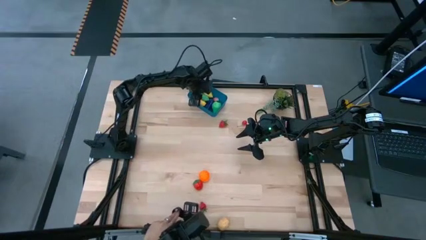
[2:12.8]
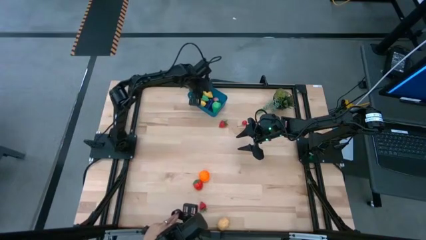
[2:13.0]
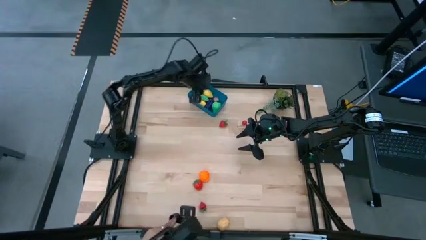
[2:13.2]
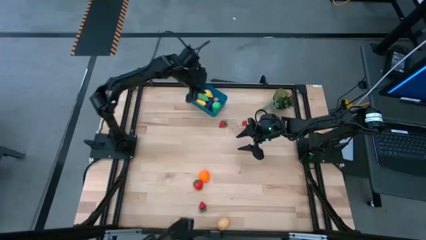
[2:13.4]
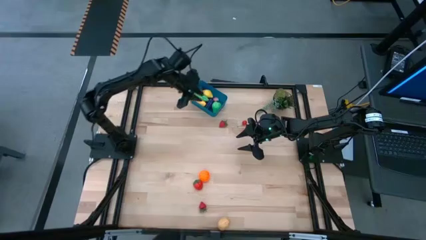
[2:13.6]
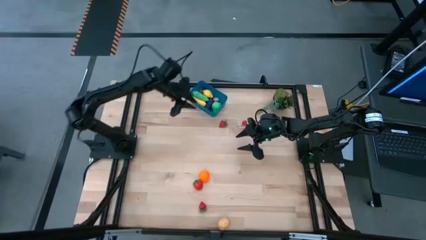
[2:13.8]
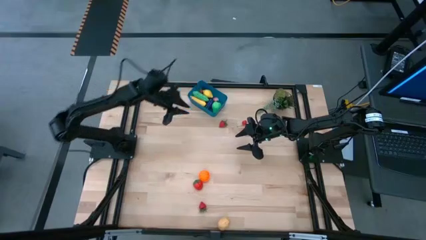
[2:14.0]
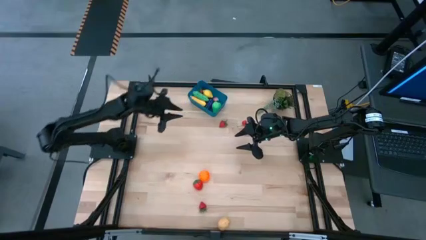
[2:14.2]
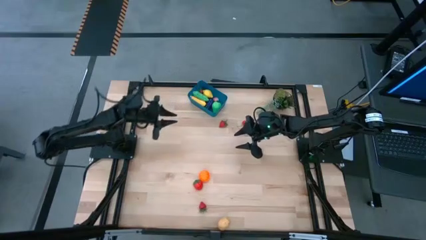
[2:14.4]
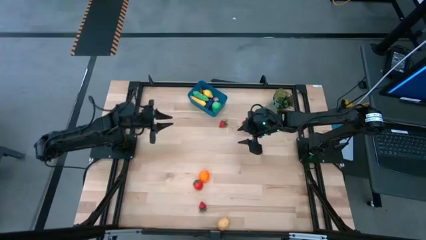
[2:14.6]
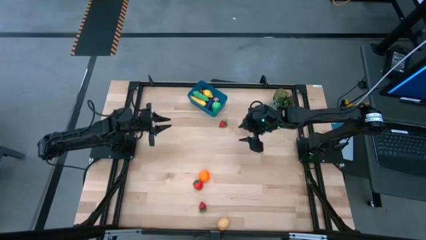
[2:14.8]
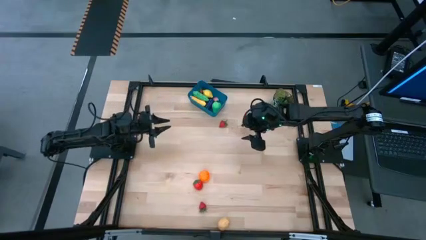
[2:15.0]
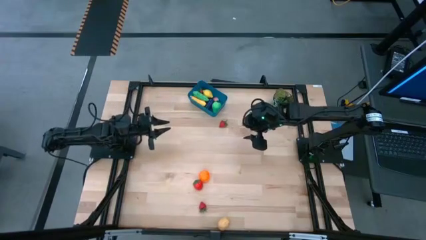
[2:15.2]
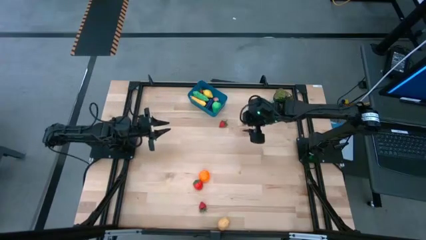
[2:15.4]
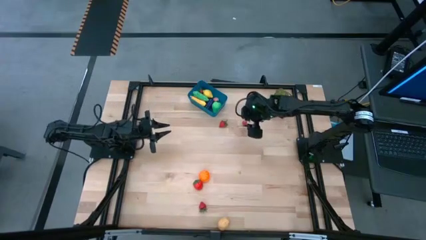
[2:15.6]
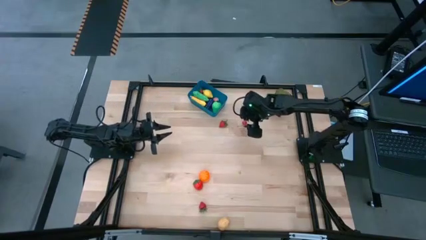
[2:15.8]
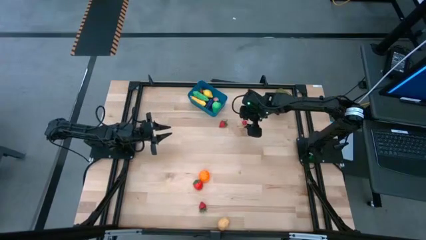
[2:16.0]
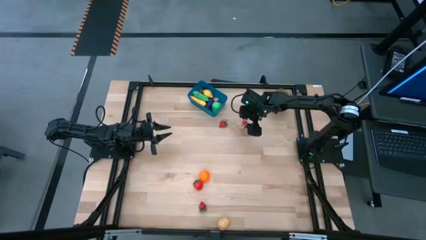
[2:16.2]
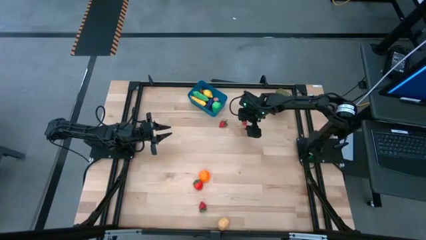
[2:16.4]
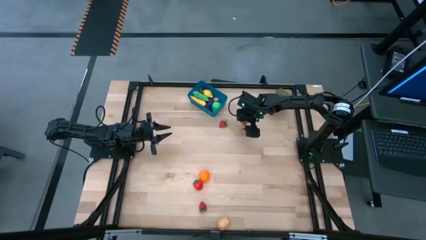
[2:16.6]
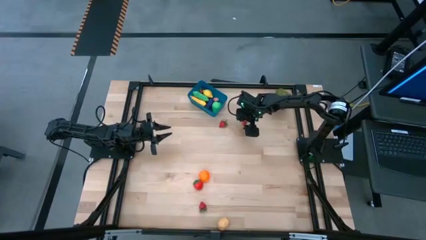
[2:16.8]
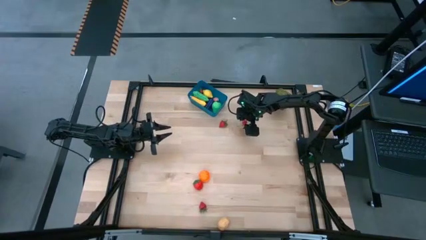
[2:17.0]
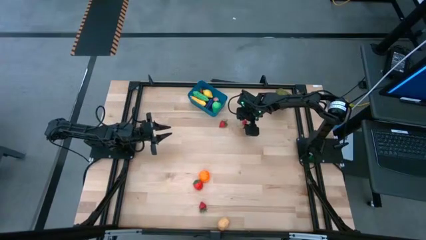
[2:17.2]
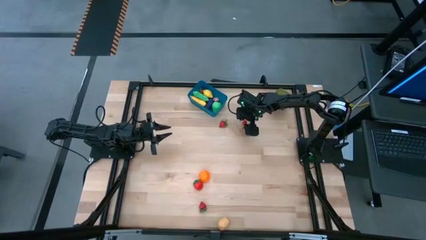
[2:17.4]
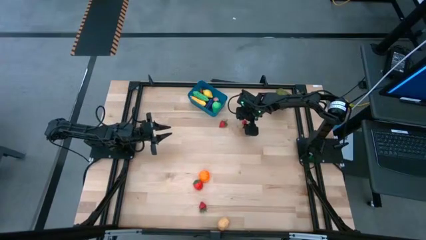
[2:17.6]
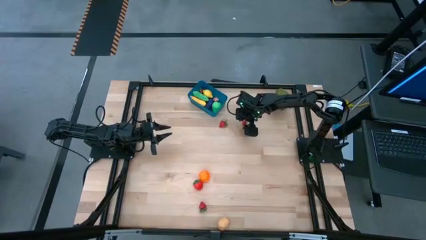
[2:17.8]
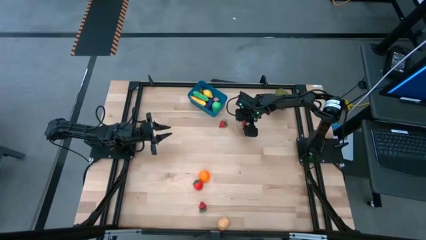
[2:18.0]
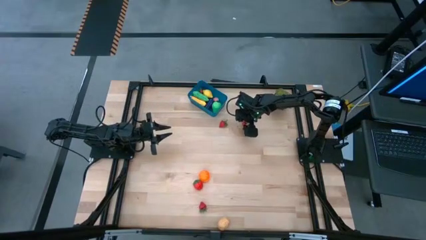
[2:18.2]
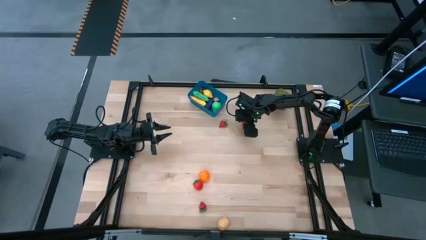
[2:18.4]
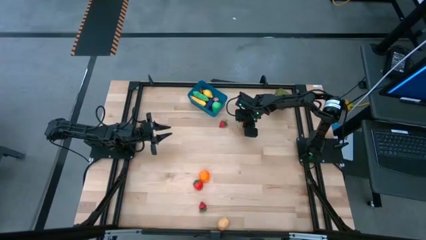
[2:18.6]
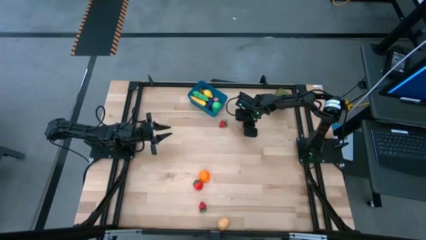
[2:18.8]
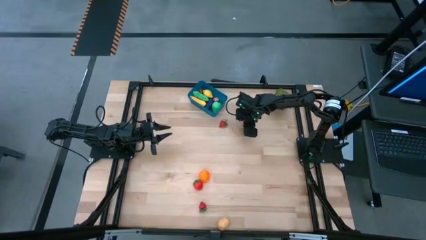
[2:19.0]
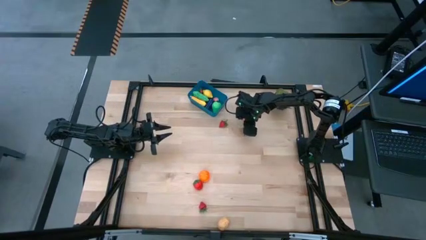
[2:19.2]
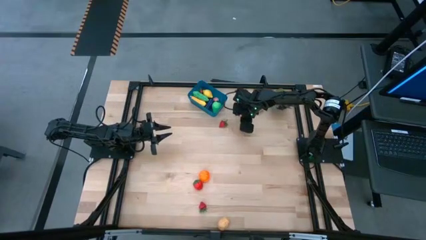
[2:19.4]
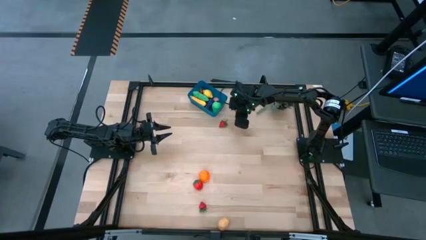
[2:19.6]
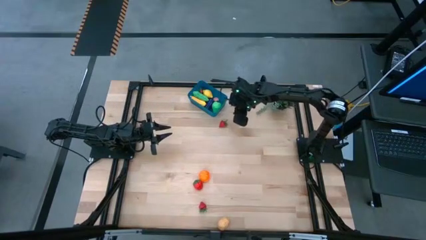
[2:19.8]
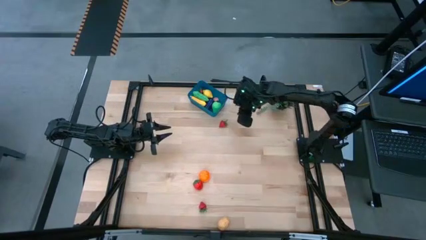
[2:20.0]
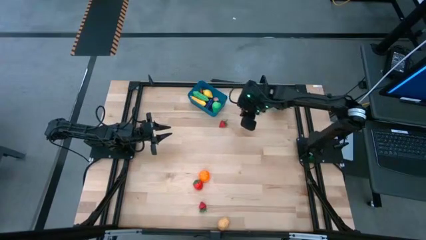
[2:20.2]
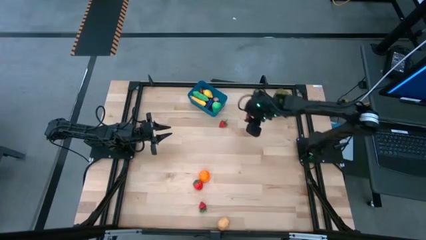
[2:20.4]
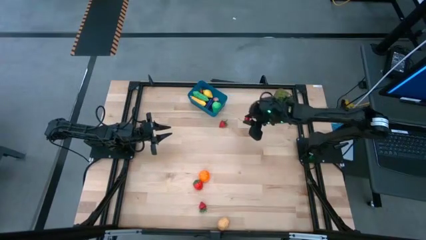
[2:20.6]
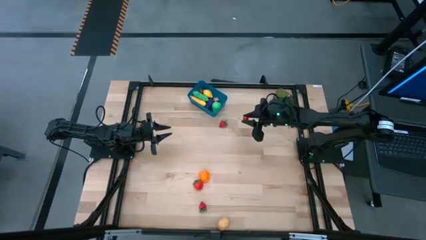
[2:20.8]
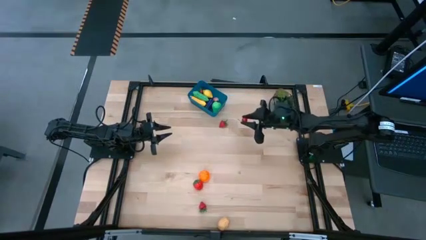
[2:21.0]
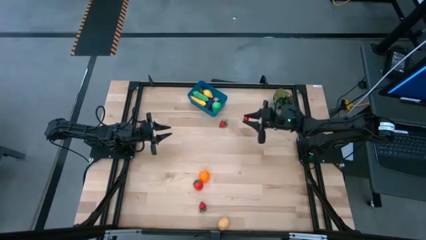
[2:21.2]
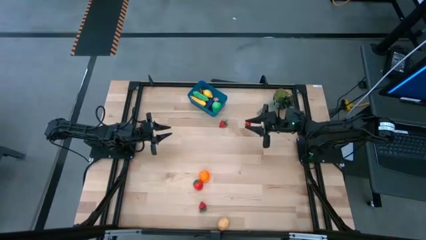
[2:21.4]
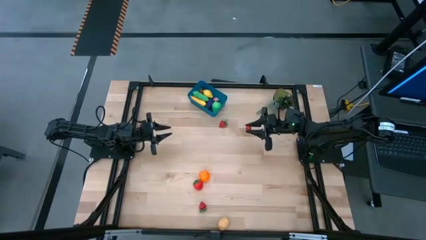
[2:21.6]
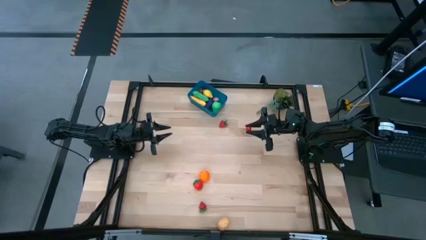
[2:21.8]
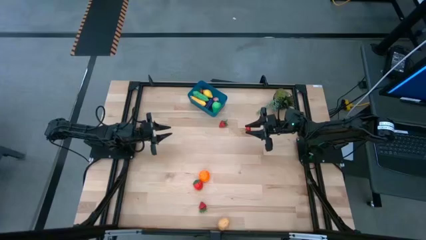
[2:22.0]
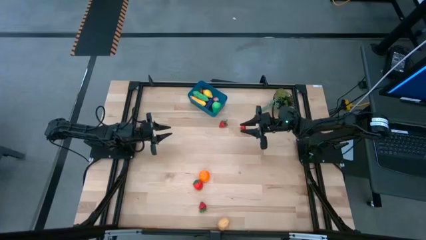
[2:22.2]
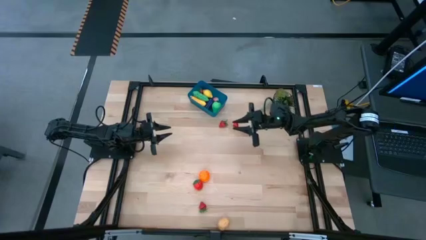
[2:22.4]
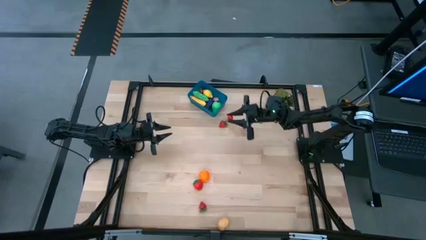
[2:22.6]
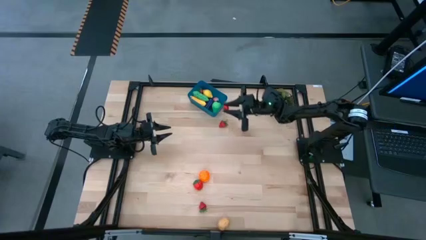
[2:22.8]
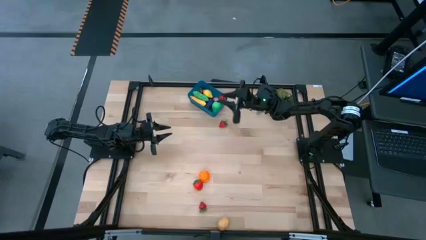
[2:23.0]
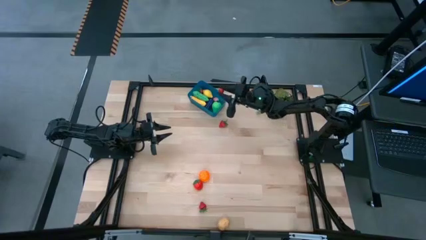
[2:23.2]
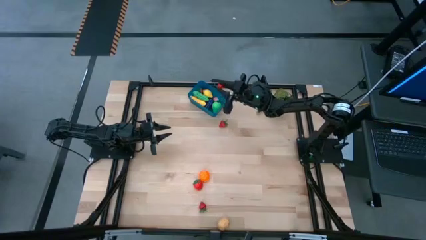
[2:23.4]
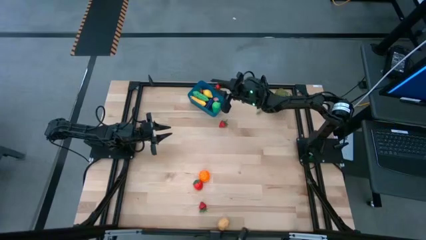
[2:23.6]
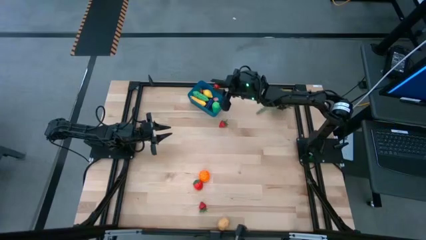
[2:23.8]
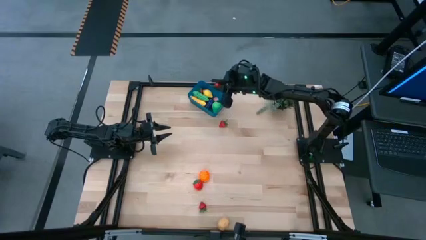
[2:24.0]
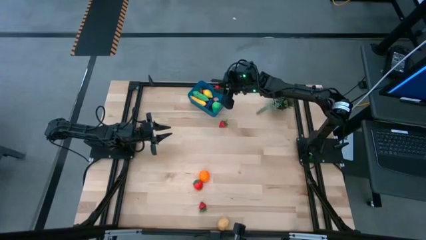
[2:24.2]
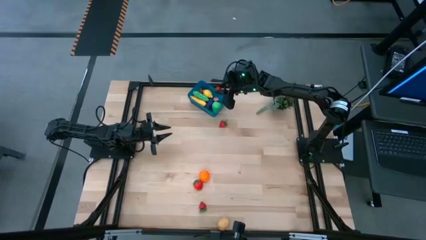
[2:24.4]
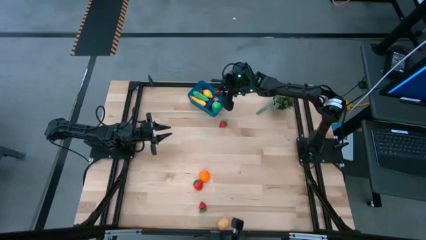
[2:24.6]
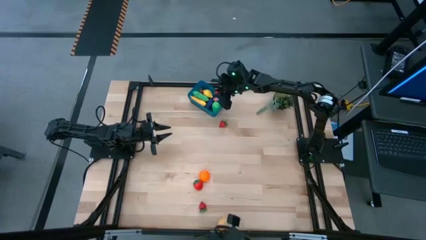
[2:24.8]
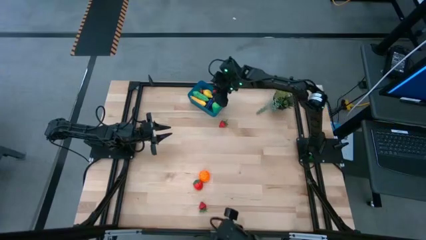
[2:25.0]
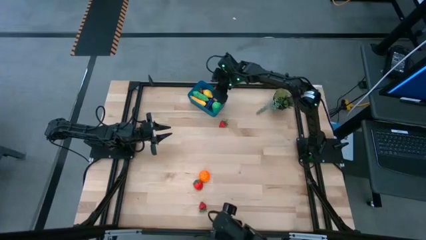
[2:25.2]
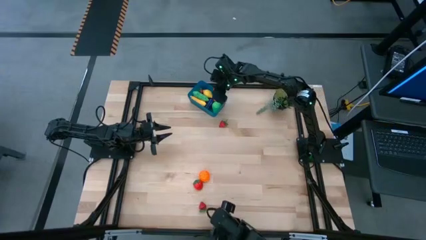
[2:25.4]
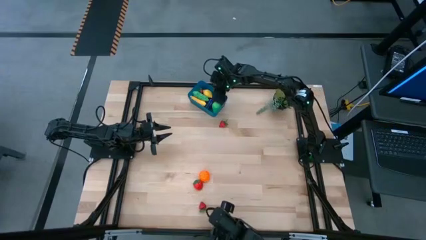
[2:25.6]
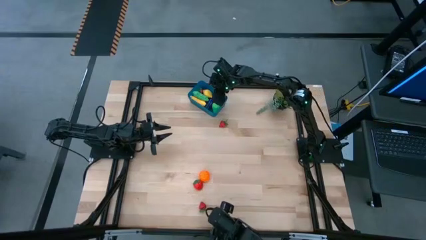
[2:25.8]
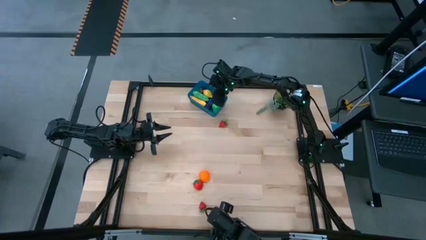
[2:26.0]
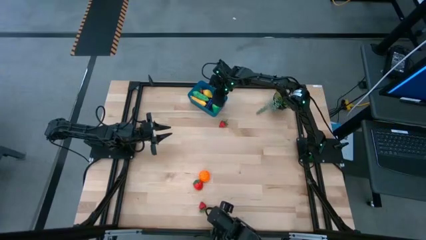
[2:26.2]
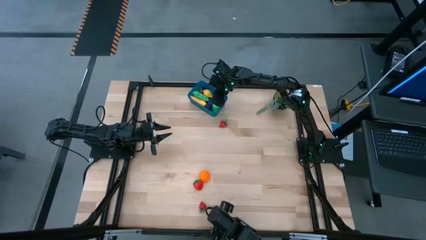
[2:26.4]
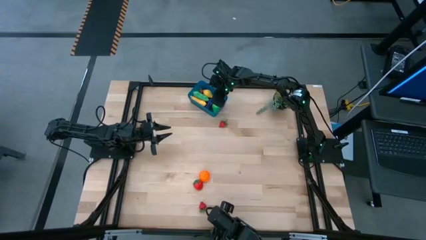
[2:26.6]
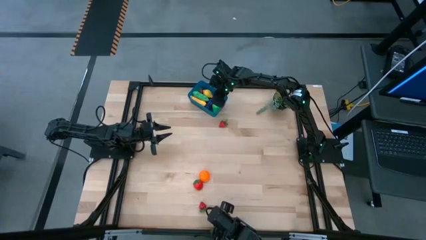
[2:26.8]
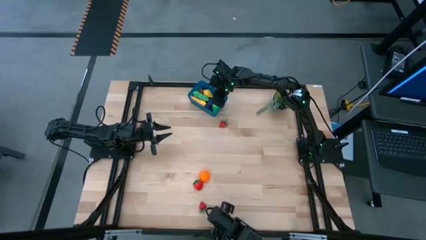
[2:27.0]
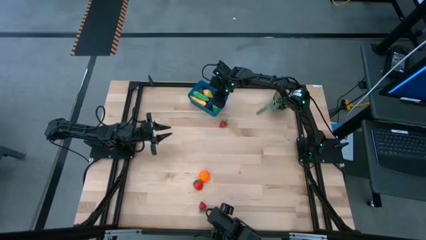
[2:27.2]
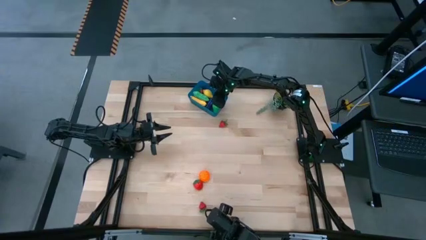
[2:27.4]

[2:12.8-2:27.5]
Task: Pick and placing Produce into tupperware
Put the red cherry into the blue bin

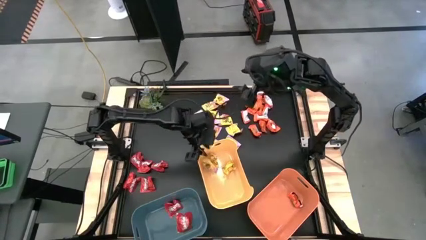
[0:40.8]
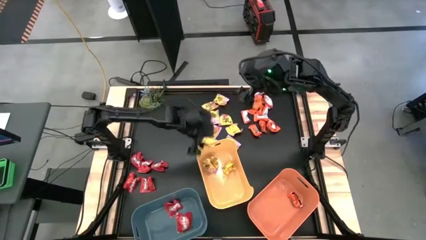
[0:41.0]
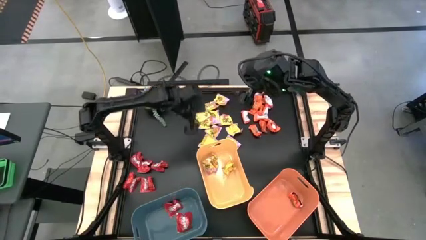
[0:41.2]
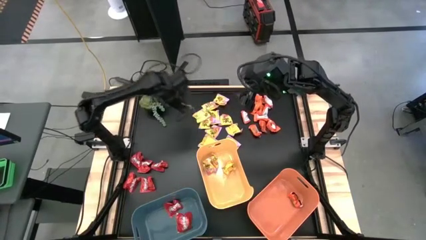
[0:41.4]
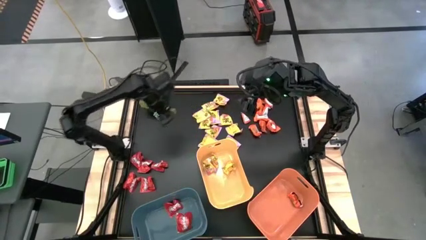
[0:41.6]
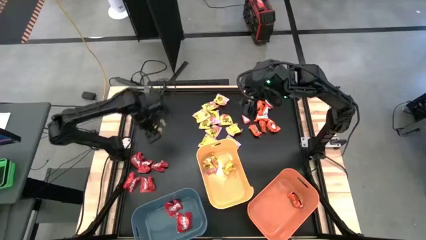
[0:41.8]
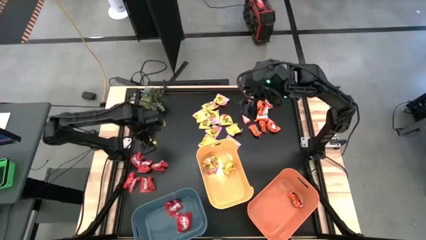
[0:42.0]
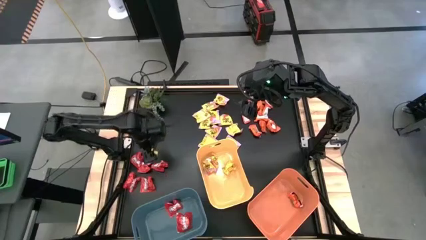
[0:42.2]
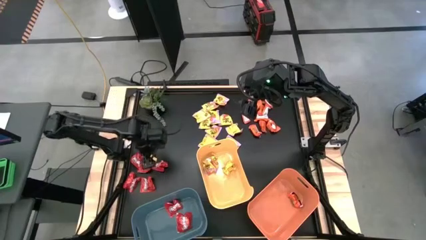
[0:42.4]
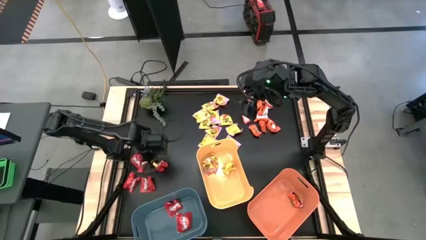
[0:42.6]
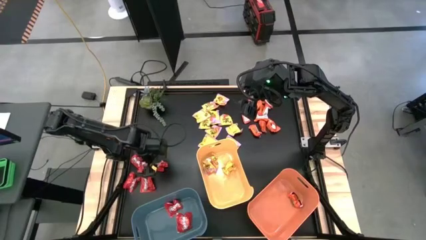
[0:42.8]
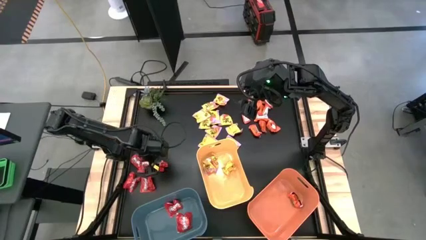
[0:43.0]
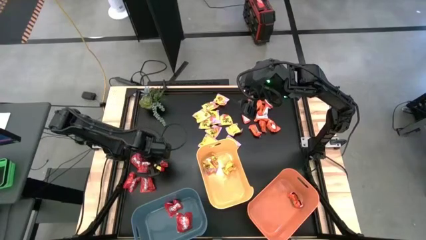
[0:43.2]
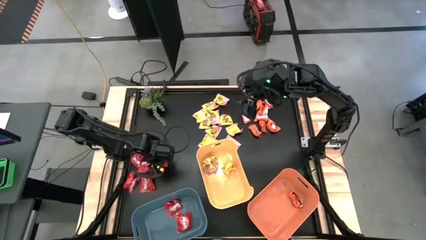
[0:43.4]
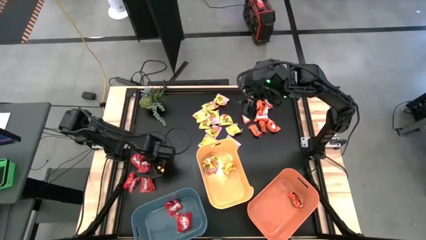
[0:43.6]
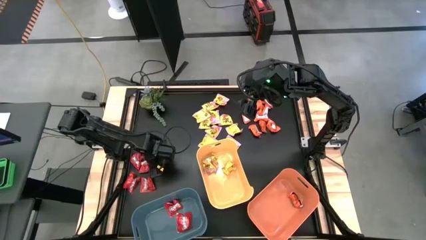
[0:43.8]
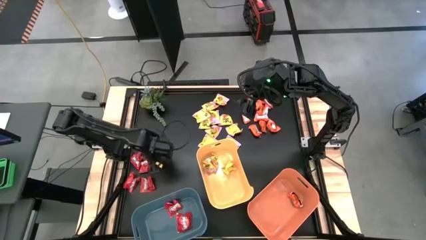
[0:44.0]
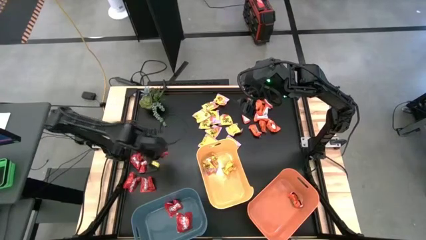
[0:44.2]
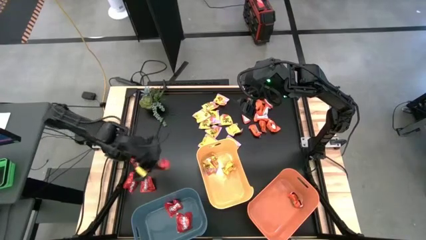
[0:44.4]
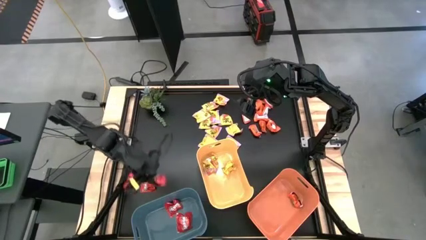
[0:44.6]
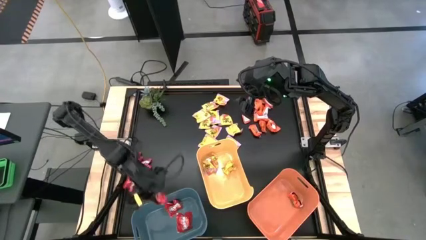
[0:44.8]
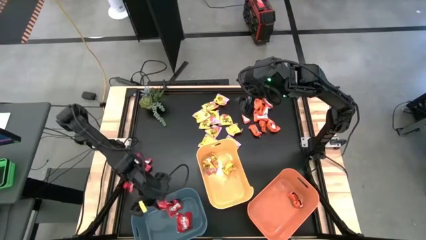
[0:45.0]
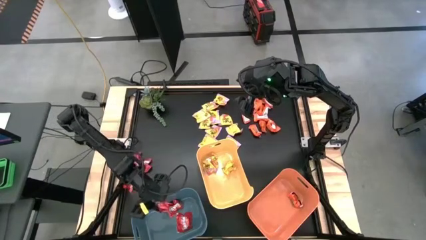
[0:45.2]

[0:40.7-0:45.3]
Task: Sort candy
Put the red candy into the blue bin
